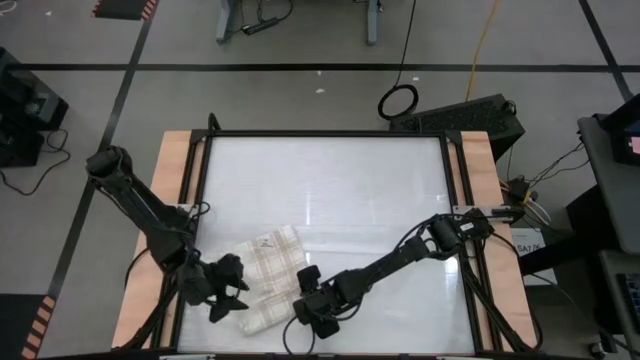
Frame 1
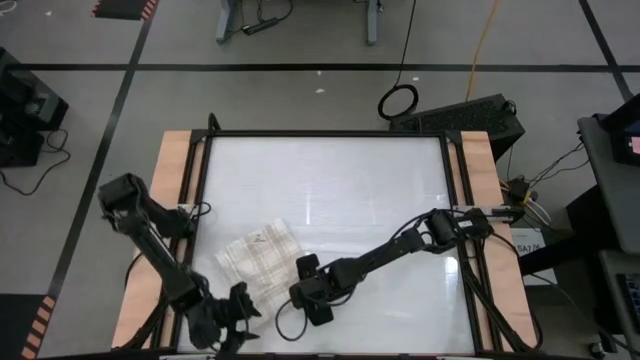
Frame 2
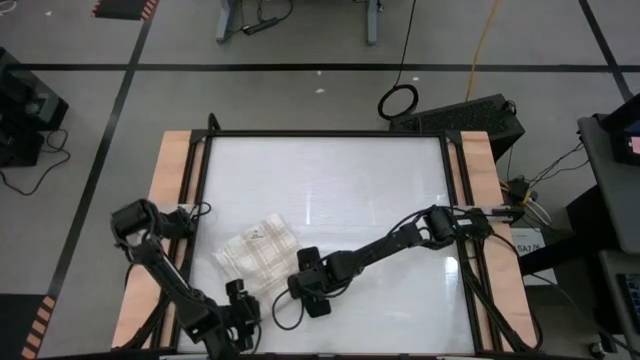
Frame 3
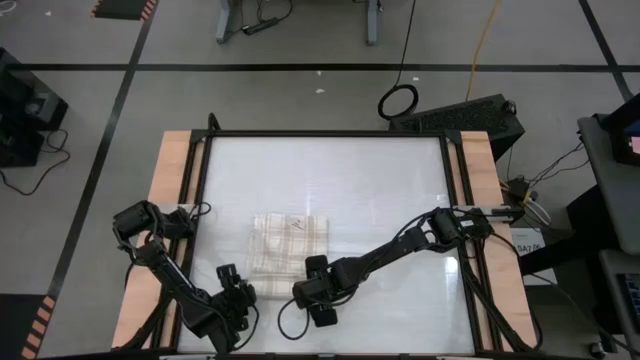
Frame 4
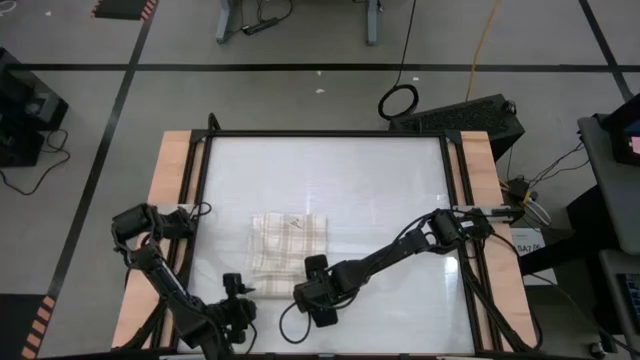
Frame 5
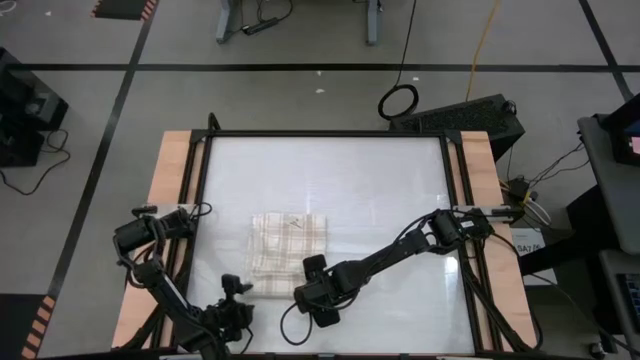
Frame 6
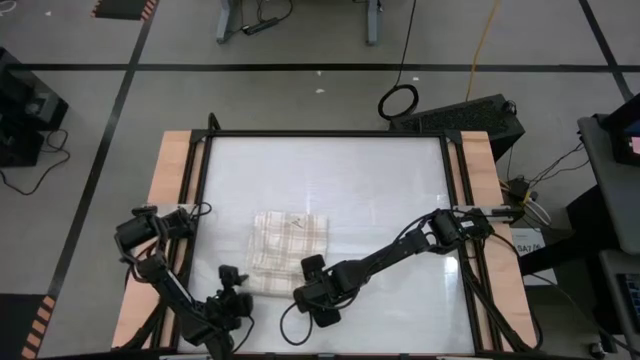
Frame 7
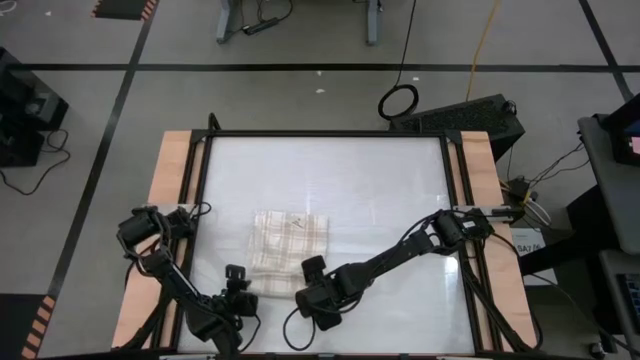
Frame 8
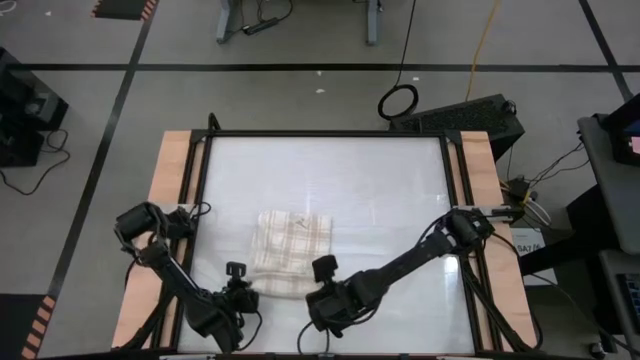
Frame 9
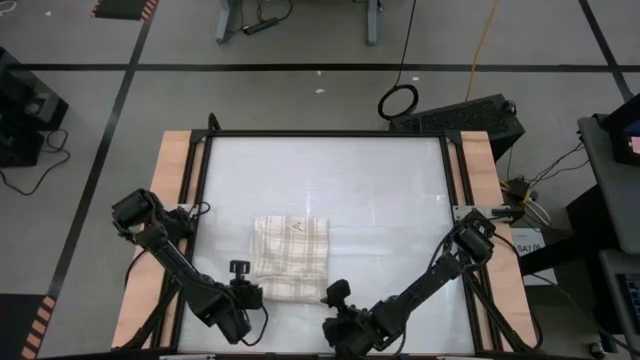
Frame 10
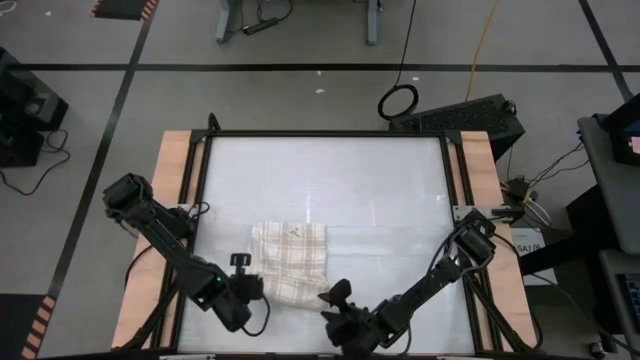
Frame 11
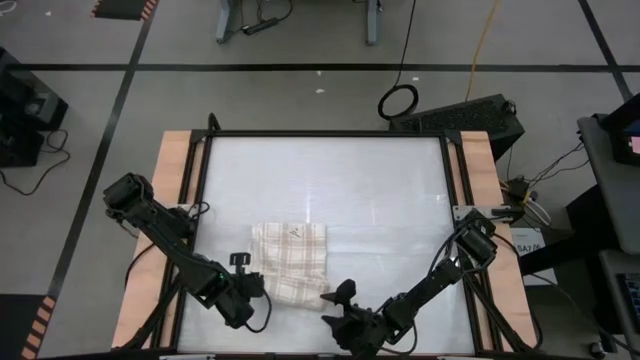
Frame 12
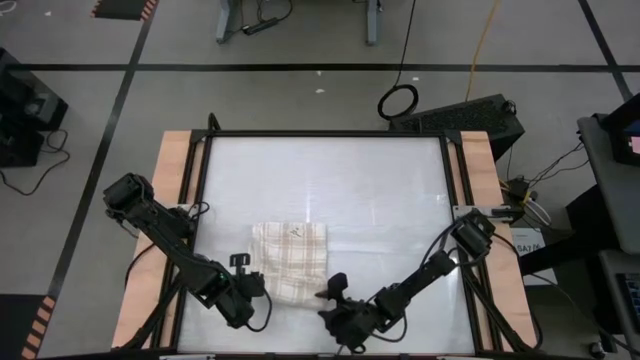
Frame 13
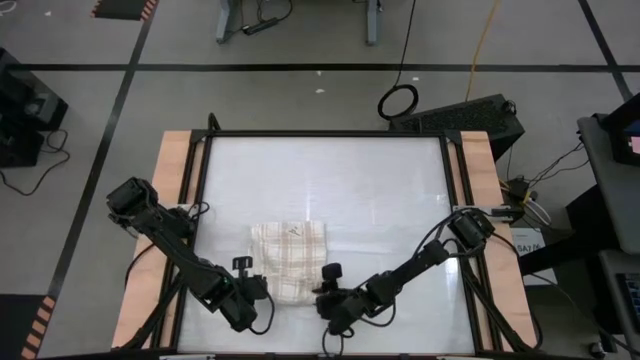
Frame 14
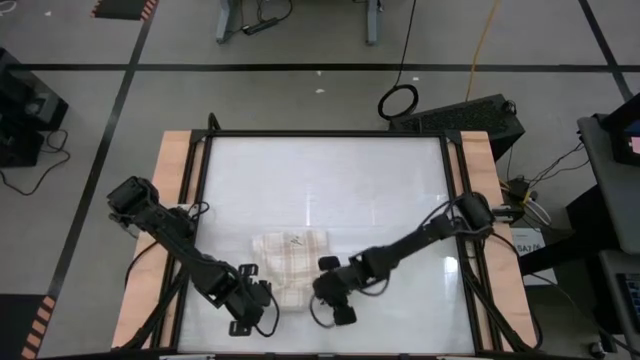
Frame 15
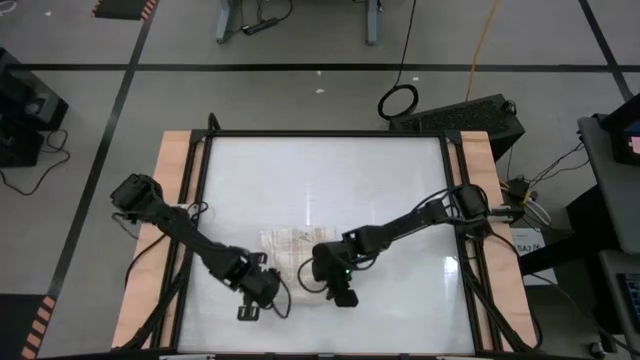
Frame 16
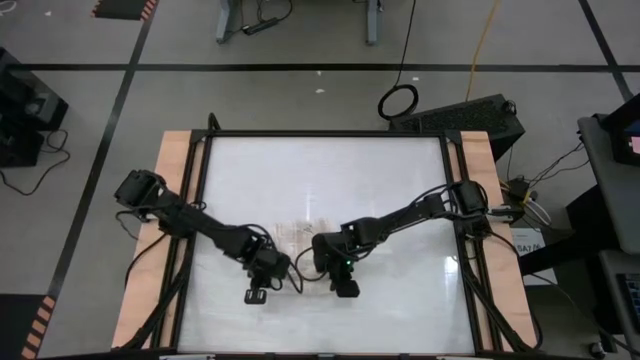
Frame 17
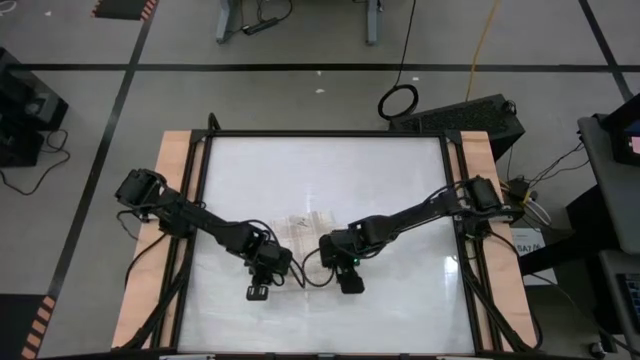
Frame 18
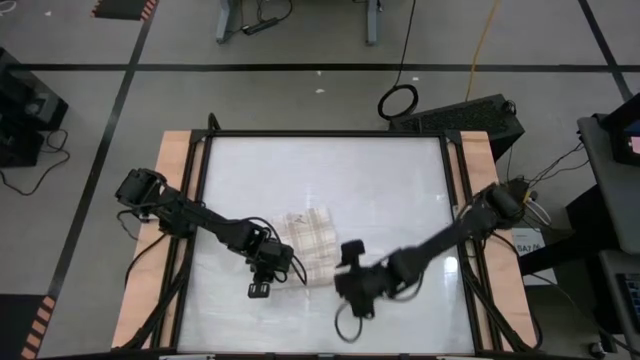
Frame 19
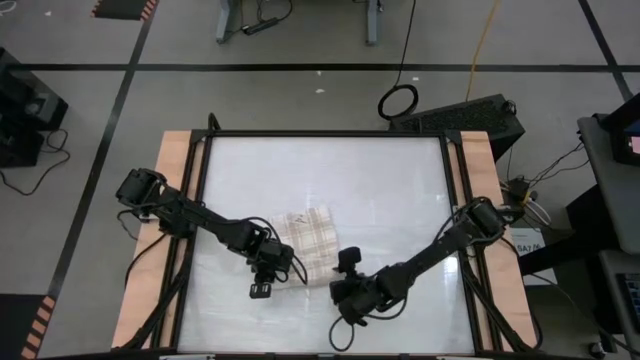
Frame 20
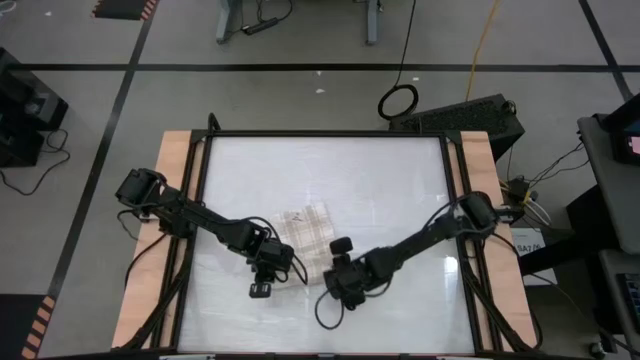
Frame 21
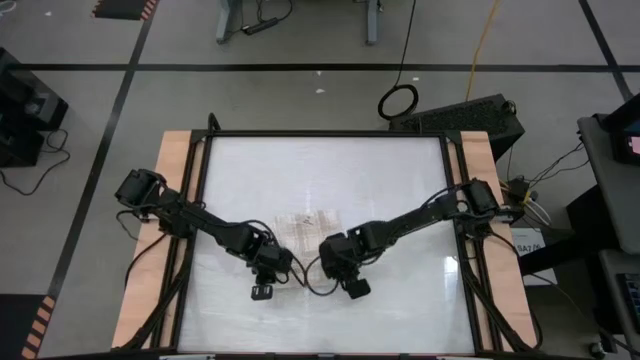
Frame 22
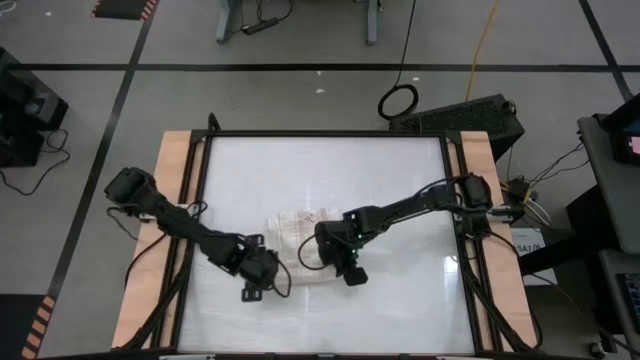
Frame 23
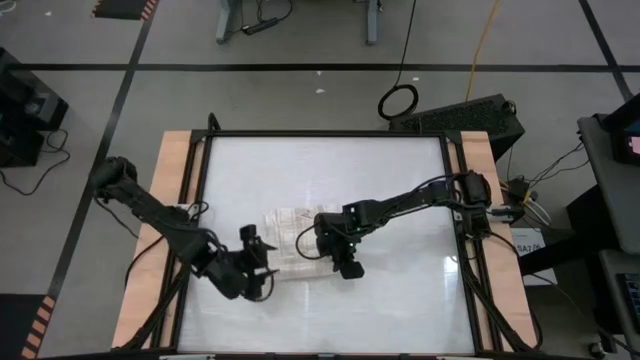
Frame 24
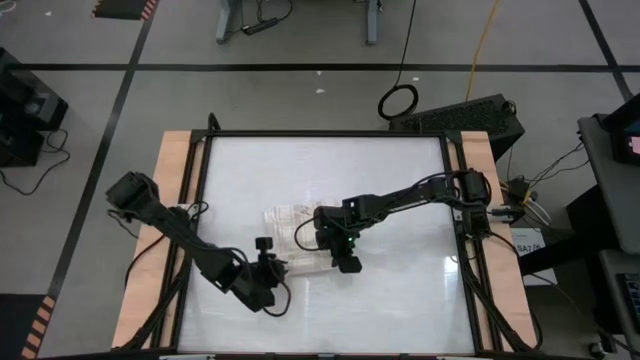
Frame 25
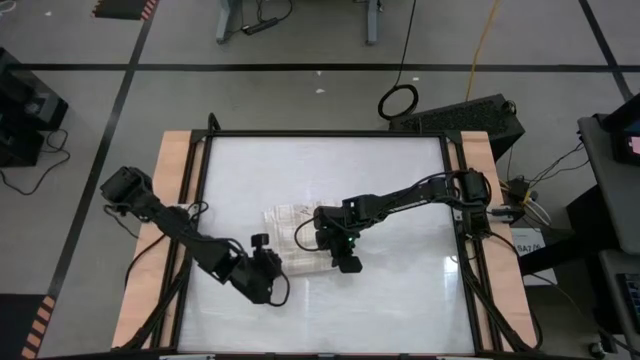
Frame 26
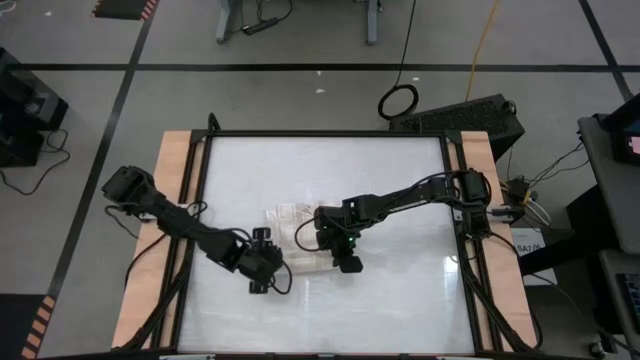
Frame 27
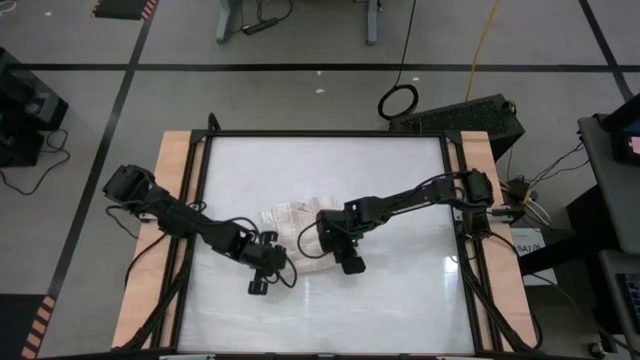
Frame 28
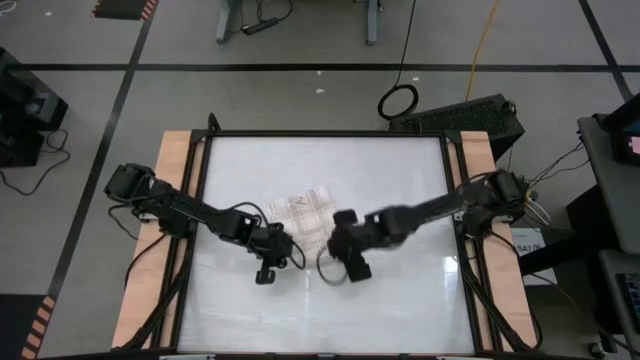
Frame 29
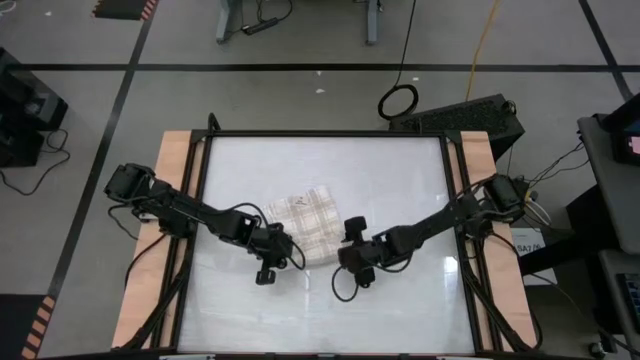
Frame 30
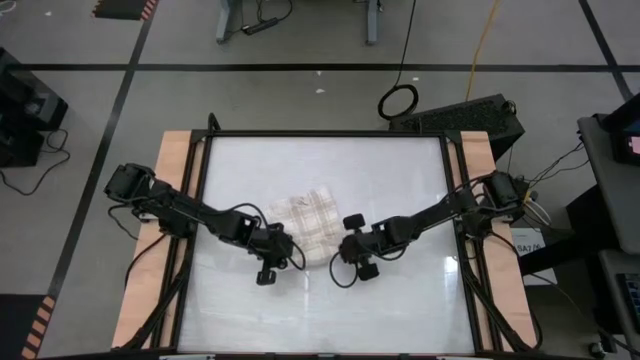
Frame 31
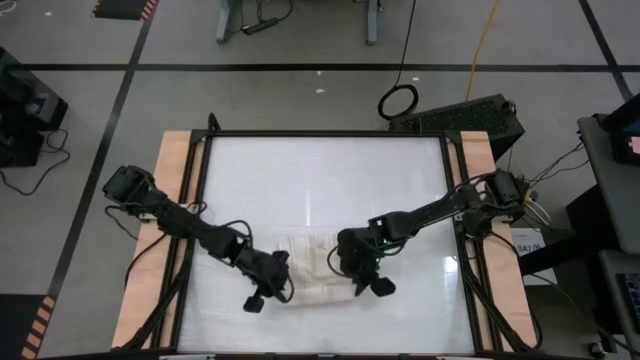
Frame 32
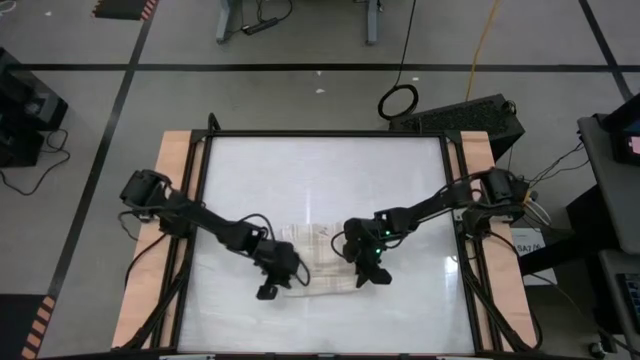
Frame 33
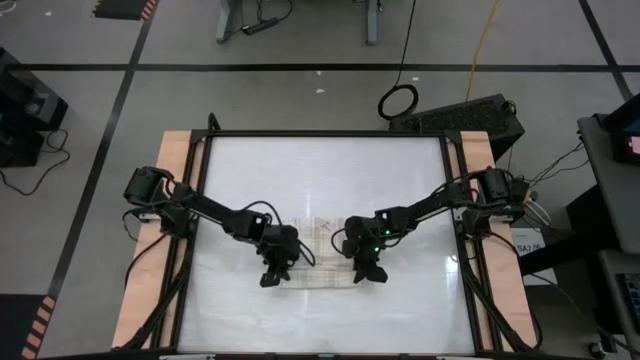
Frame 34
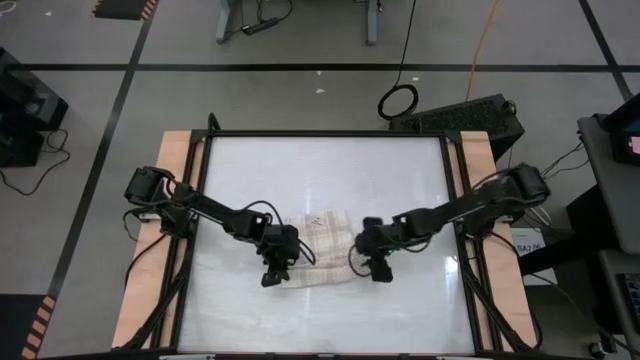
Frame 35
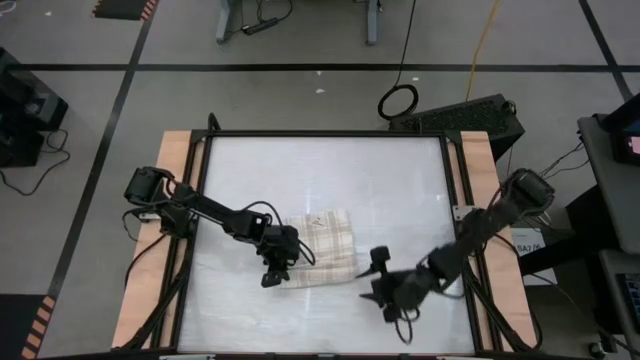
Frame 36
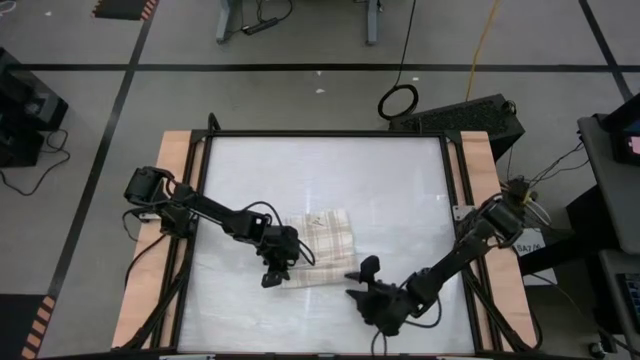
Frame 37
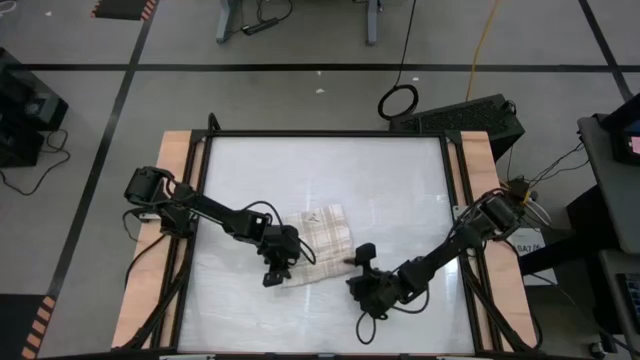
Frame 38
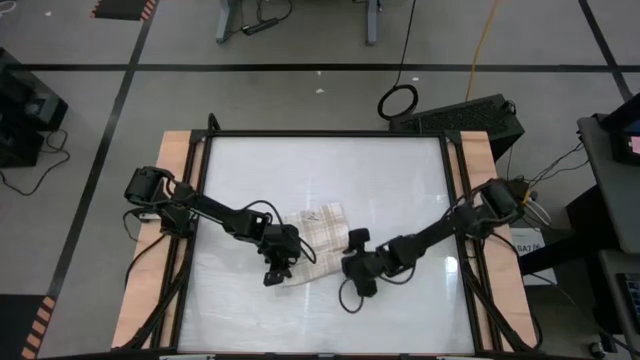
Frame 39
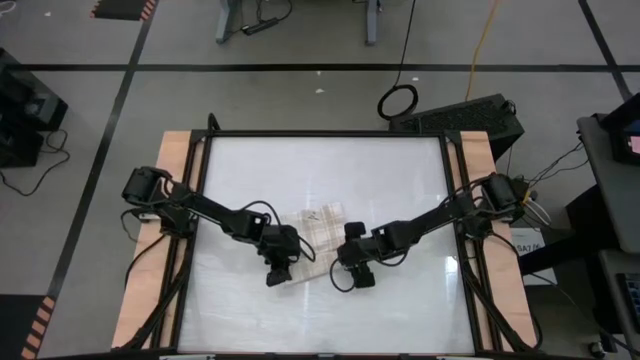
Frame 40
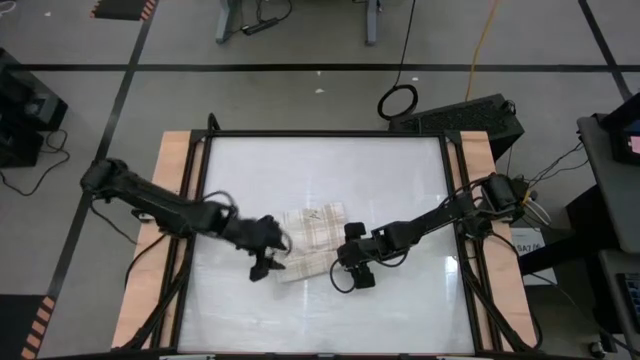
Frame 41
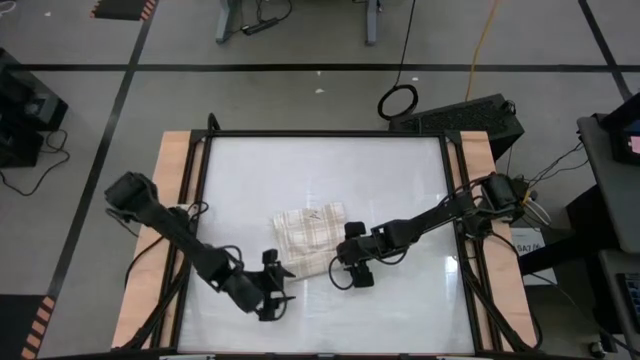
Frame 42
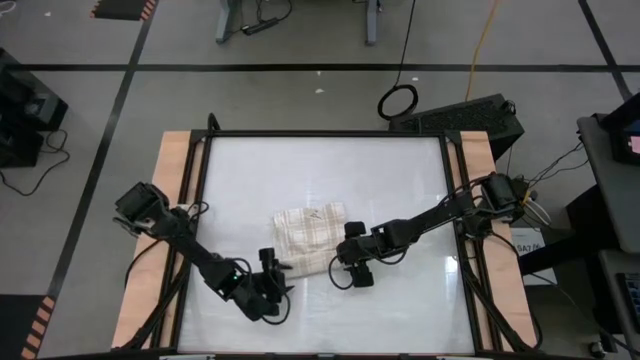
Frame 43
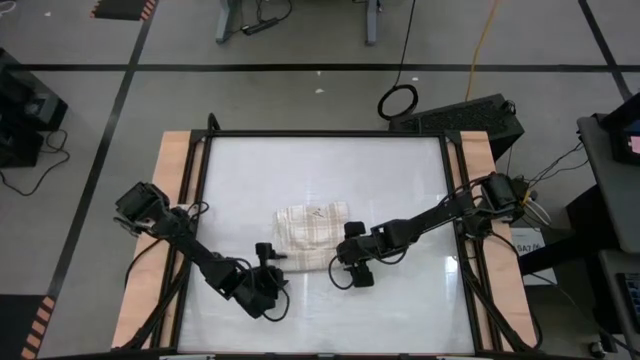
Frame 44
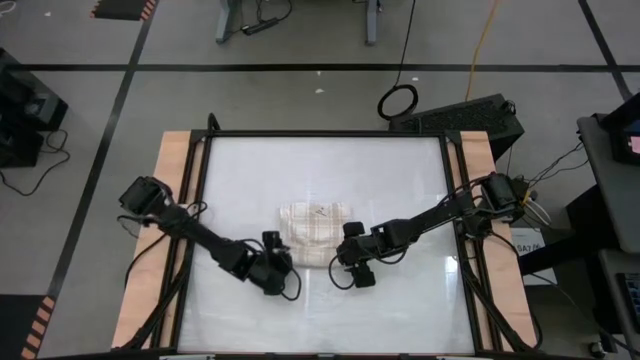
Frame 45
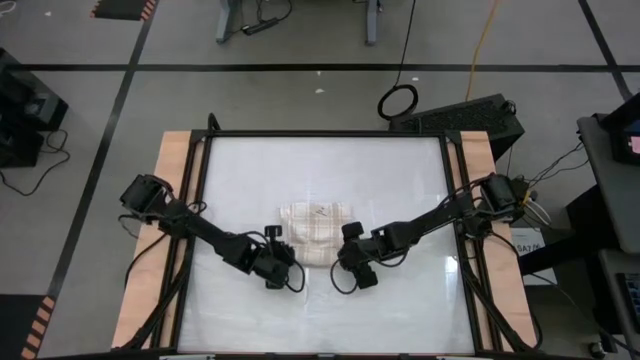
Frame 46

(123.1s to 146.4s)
Task: Roll towel
Roll the white towel
